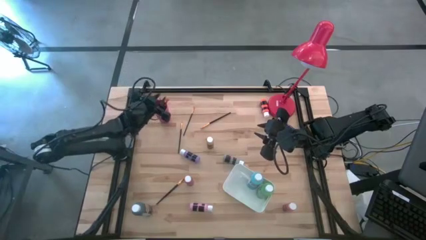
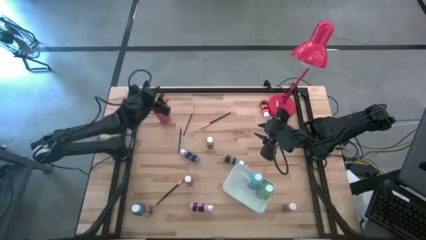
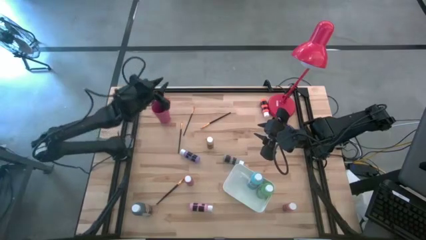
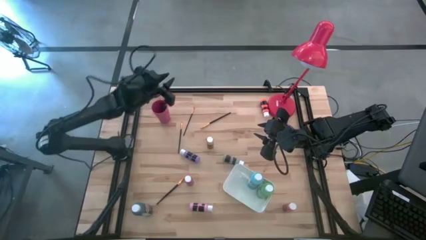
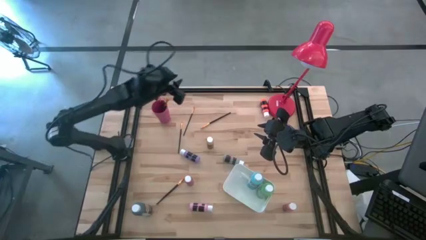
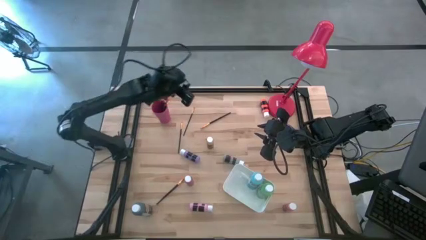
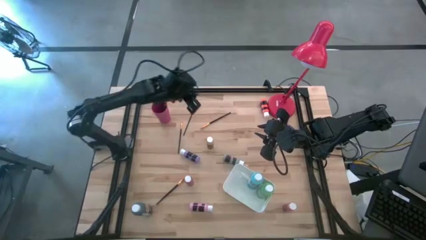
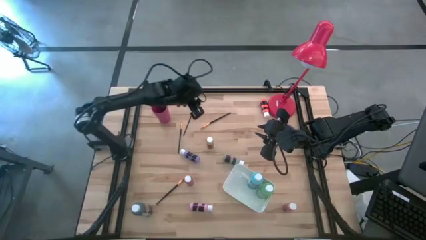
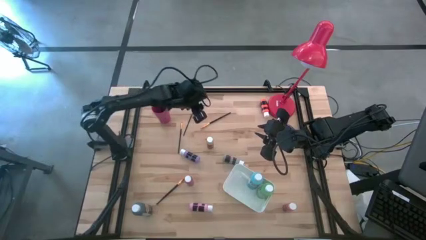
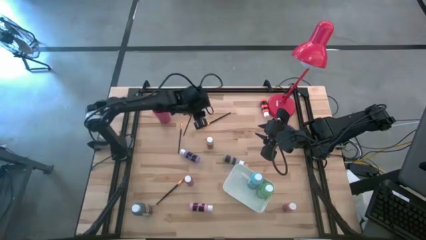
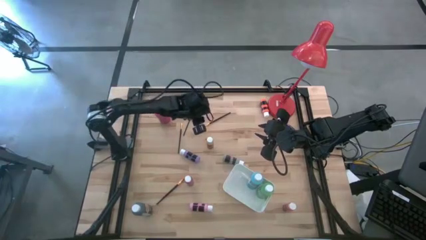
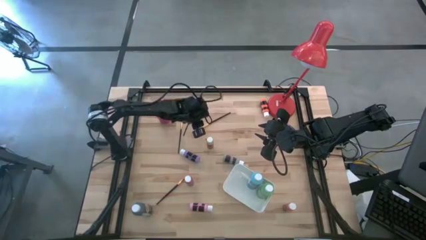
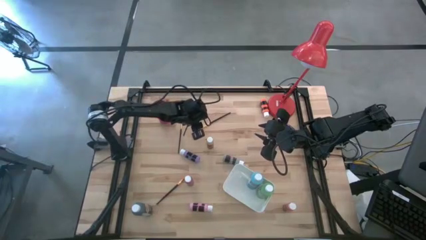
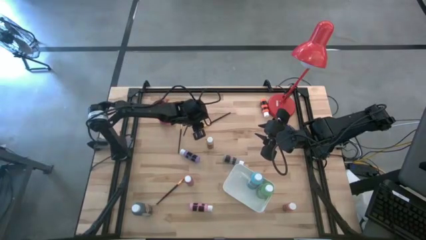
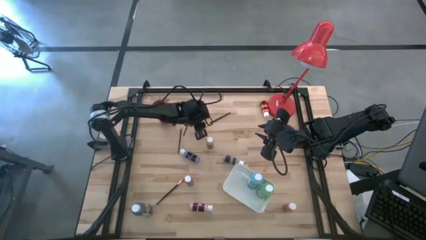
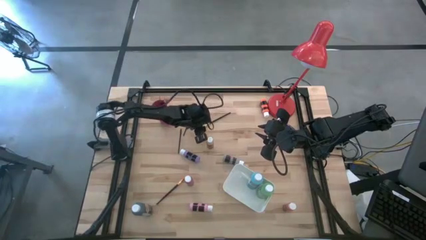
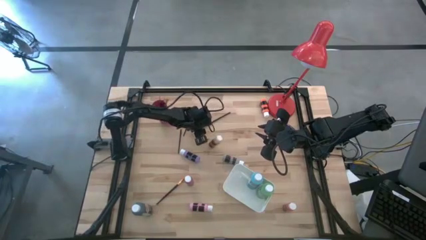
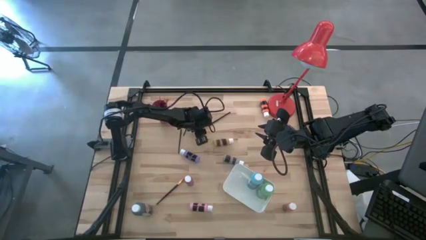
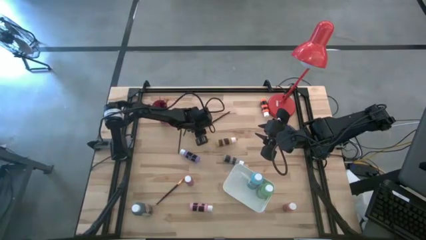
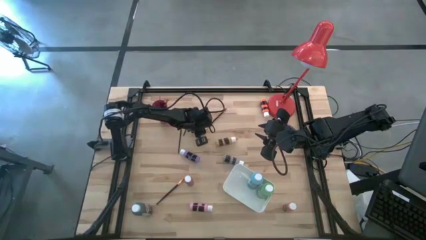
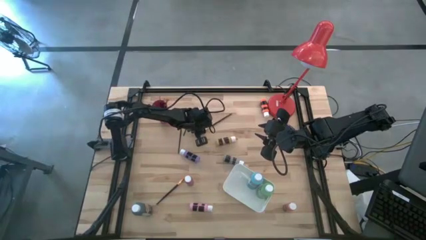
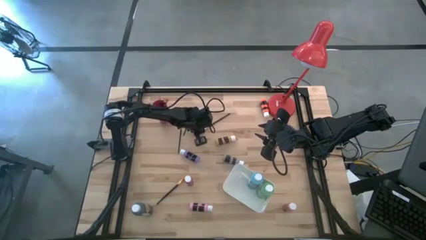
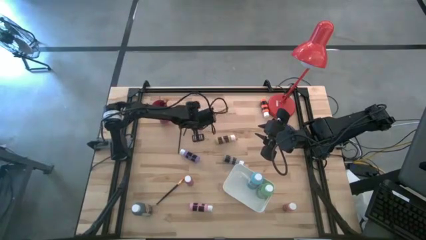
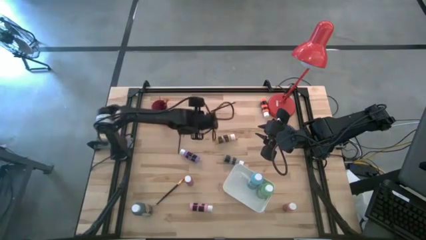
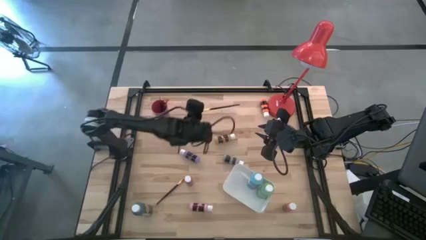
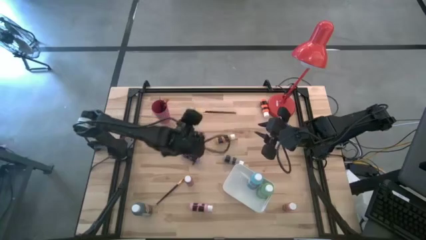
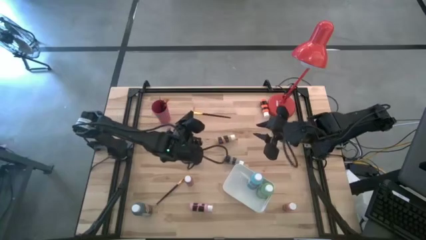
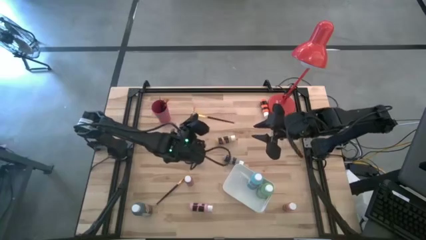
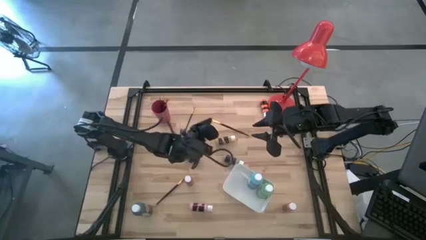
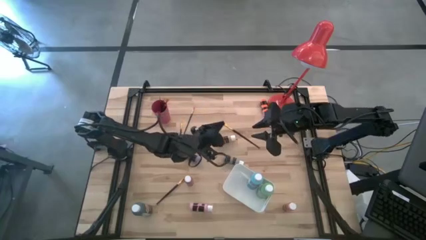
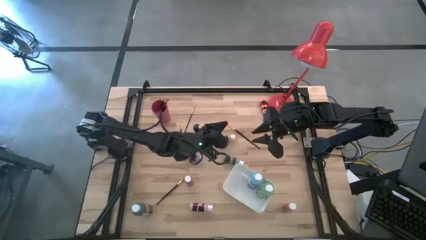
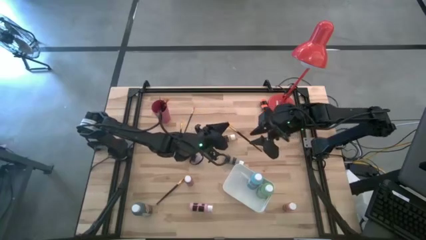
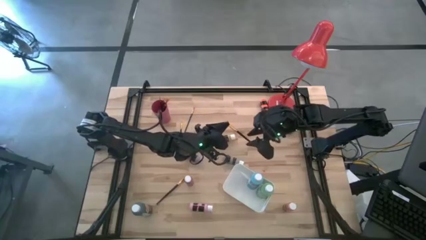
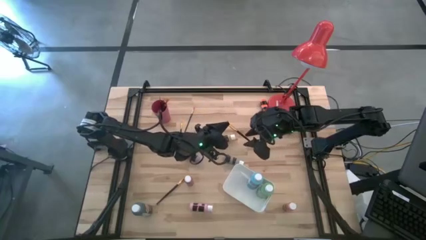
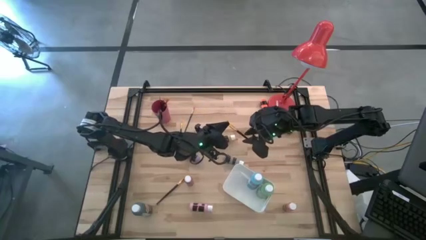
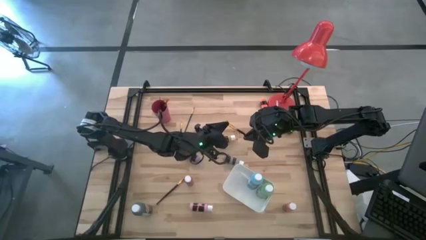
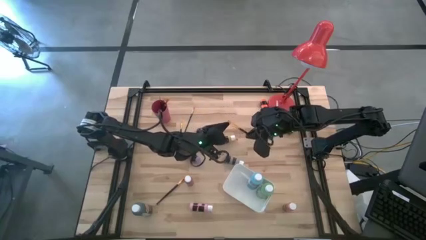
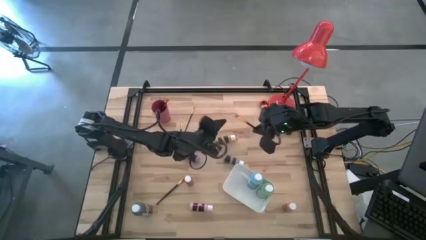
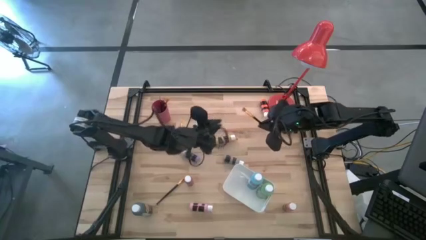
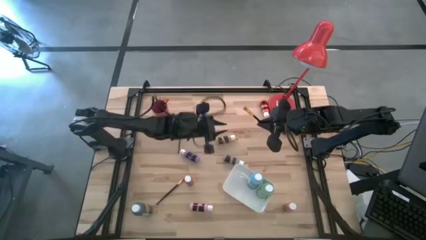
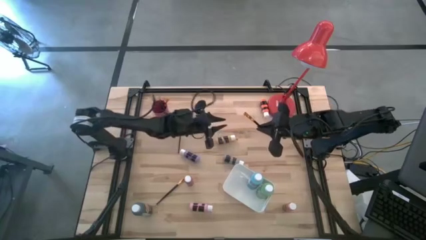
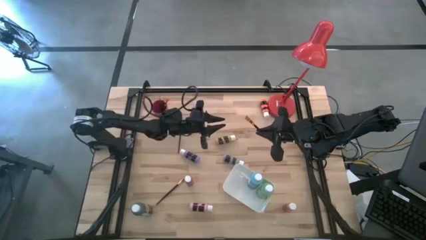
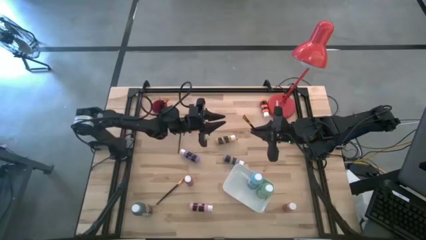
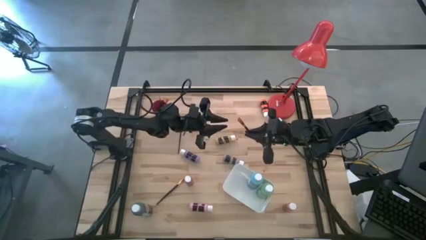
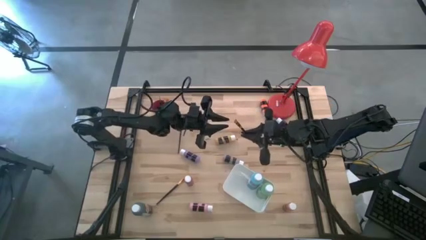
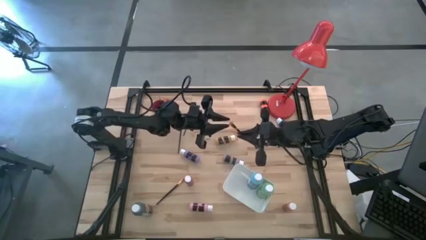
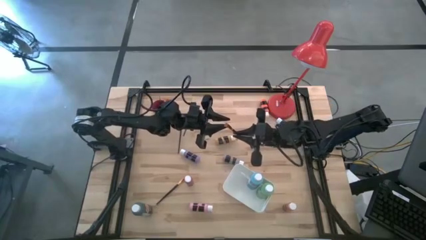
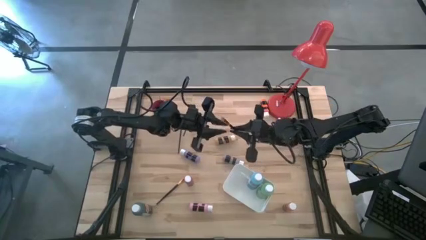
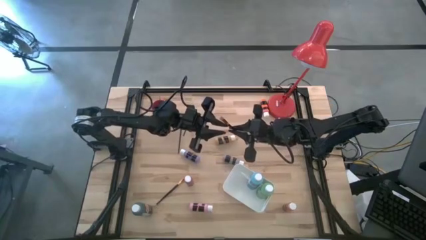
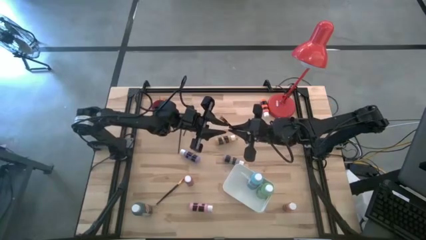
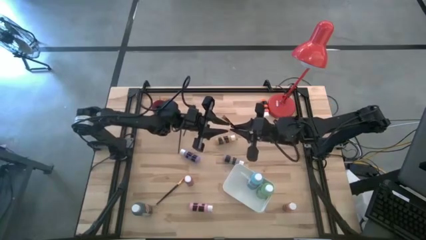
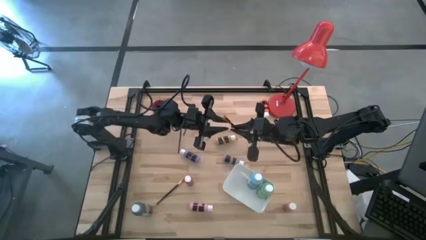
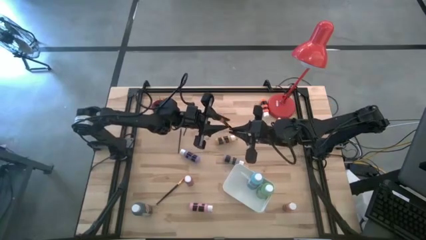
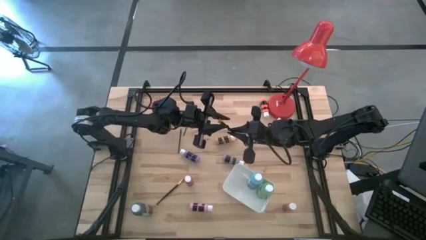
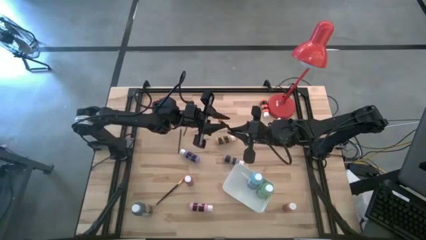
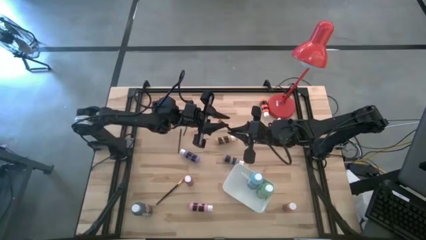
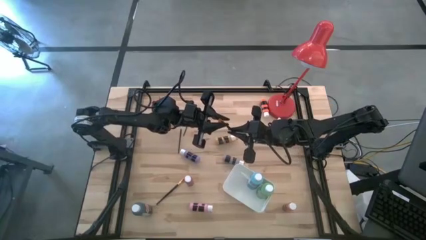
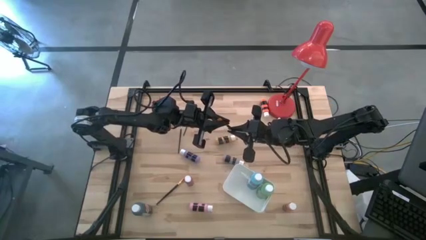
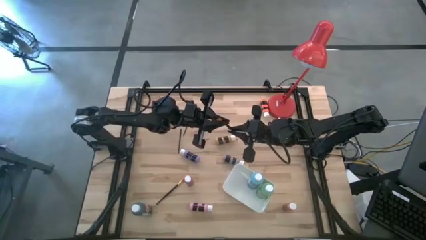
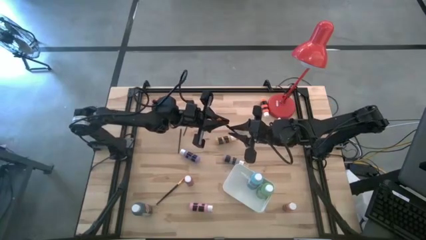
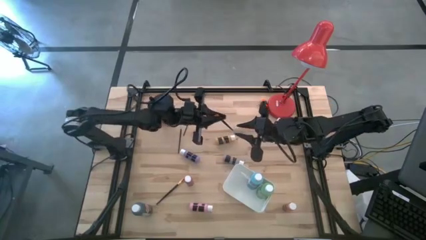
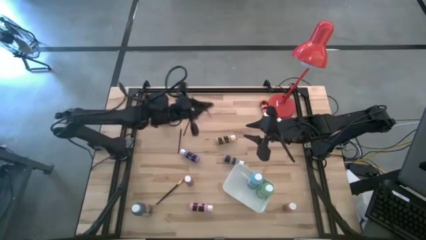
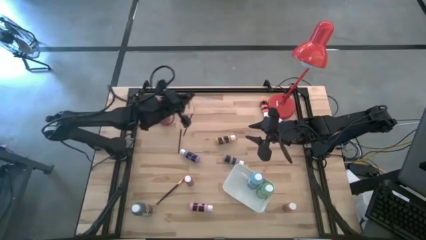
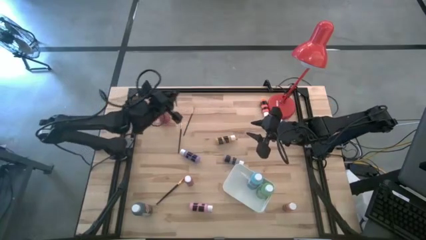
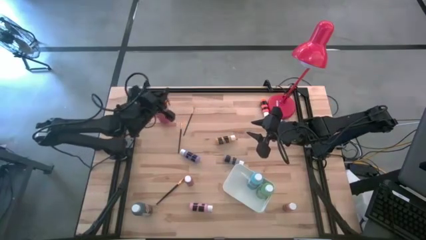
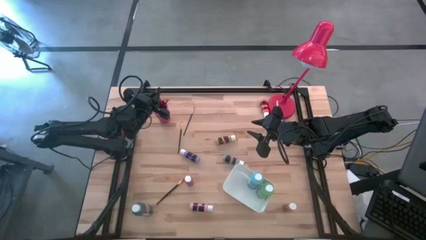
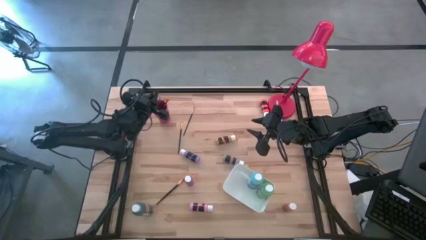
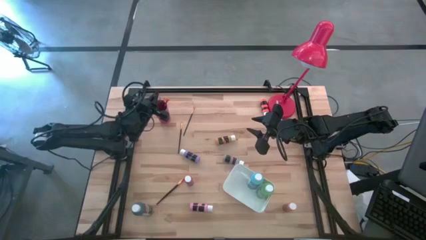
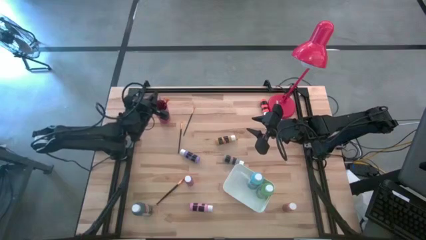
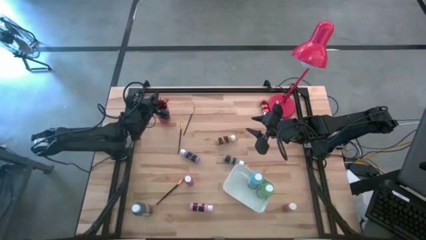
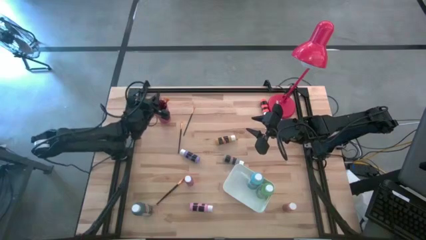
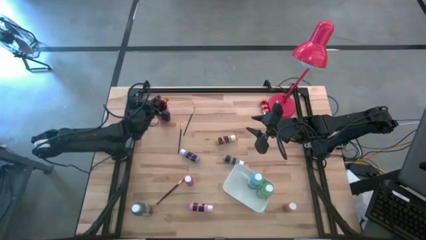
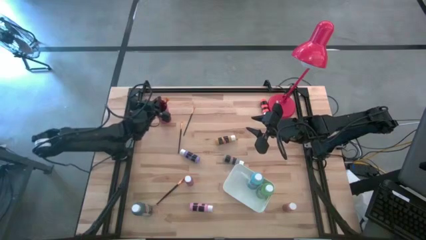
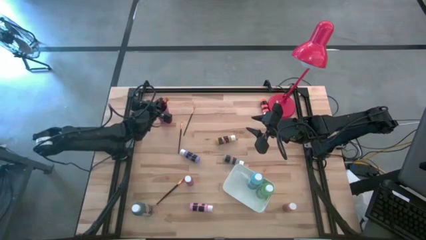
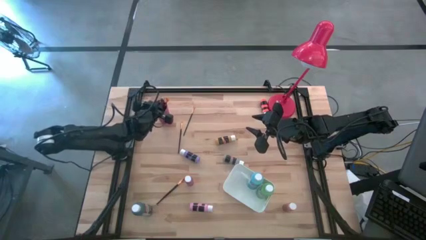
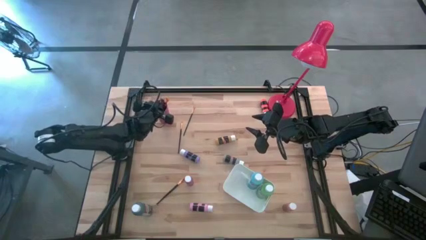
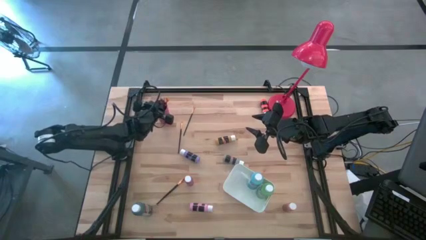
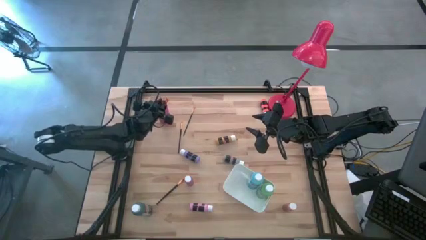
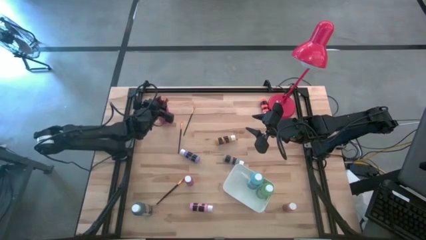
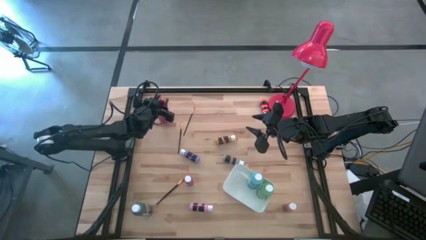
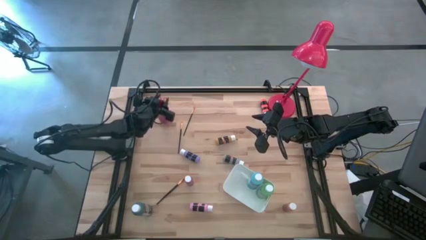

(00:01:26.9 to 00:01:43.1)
Task: Pick & Place Paint Supplies
Put the orange paintbrush into the pink cup
